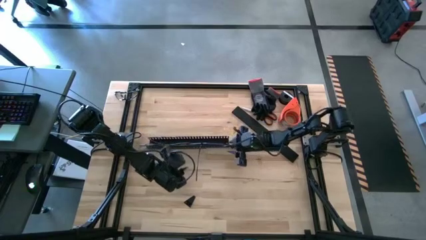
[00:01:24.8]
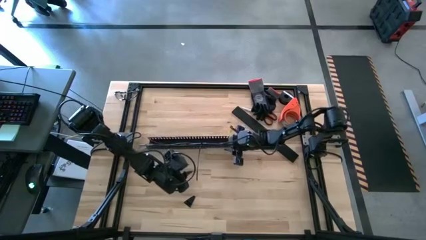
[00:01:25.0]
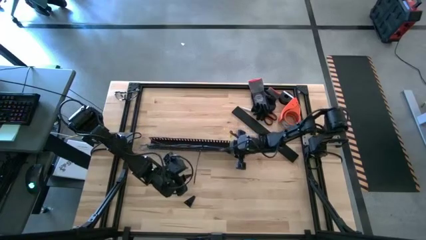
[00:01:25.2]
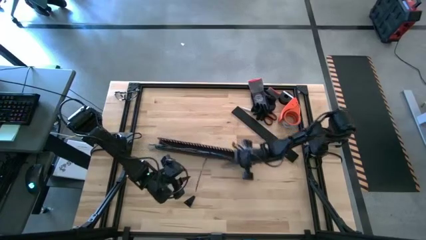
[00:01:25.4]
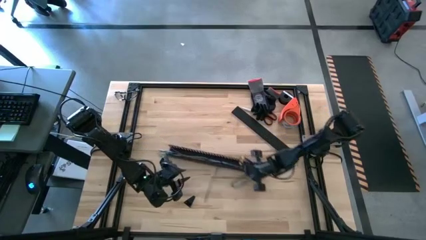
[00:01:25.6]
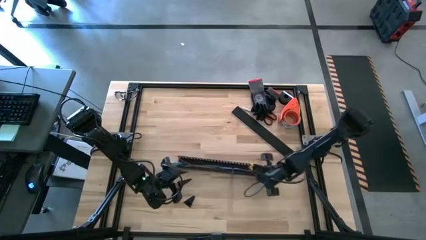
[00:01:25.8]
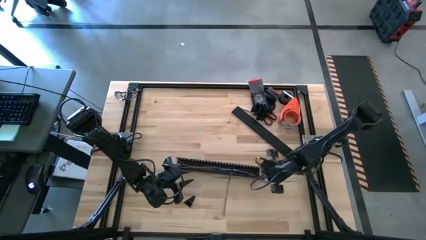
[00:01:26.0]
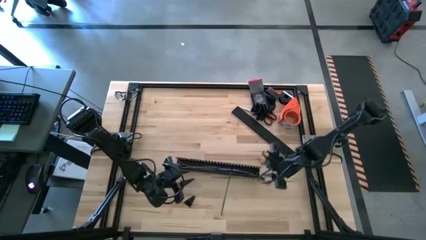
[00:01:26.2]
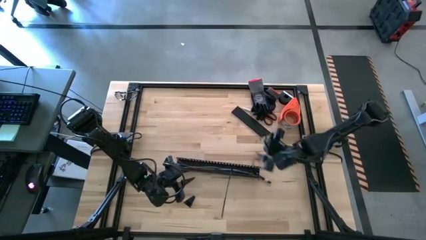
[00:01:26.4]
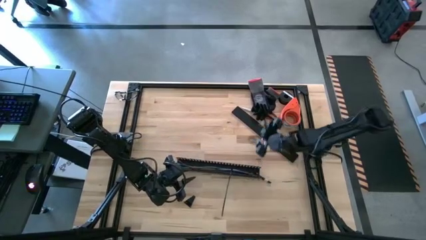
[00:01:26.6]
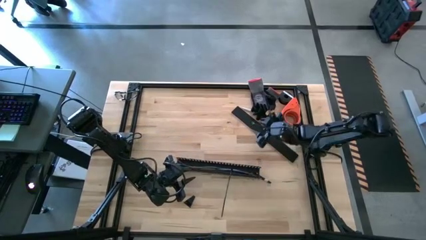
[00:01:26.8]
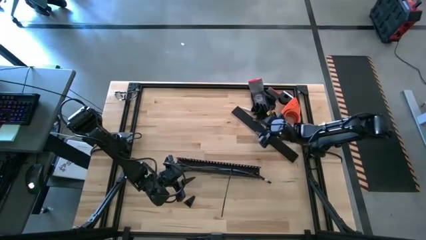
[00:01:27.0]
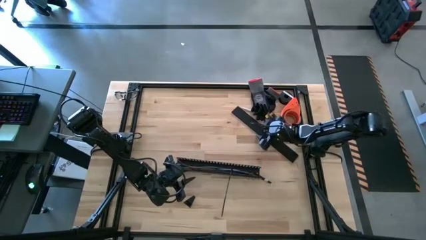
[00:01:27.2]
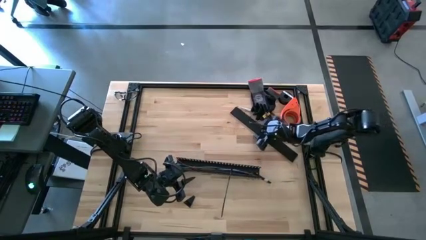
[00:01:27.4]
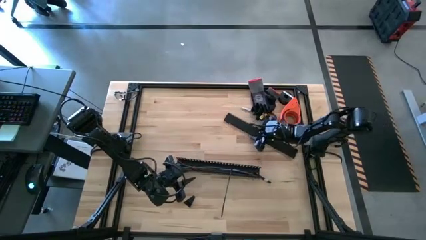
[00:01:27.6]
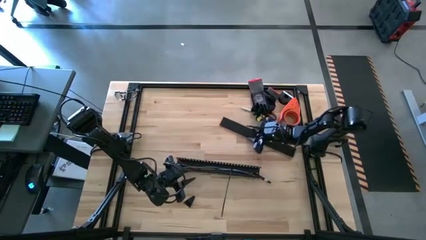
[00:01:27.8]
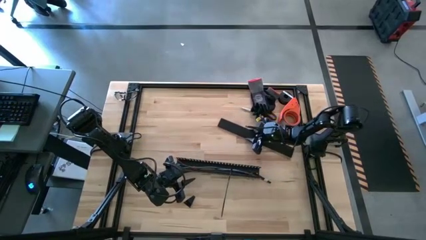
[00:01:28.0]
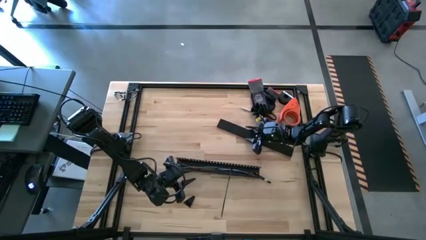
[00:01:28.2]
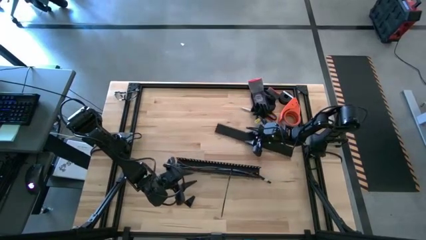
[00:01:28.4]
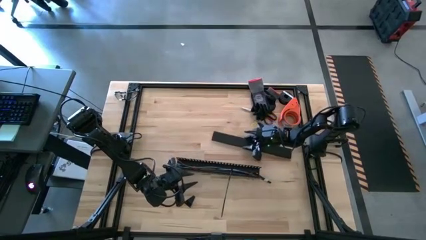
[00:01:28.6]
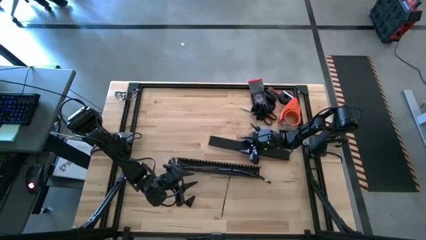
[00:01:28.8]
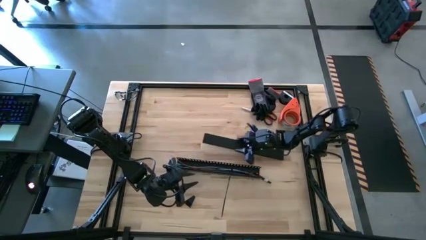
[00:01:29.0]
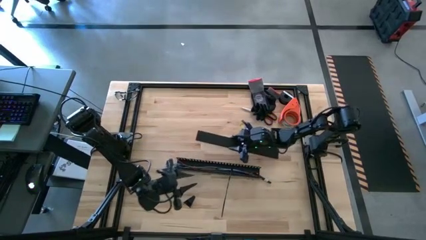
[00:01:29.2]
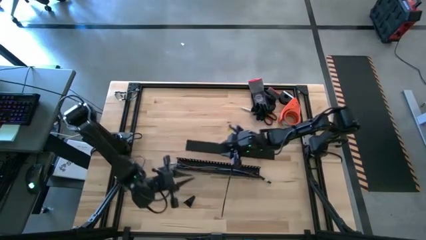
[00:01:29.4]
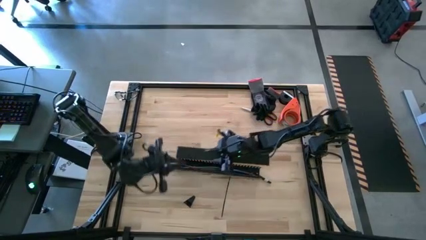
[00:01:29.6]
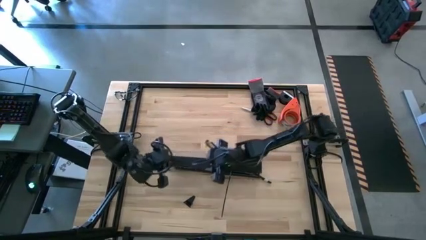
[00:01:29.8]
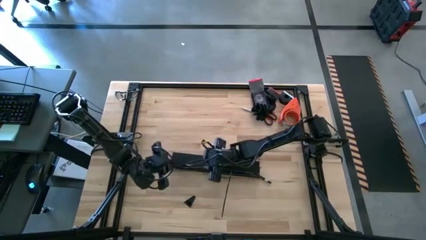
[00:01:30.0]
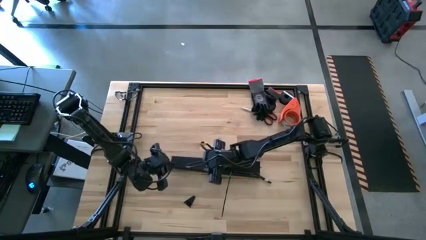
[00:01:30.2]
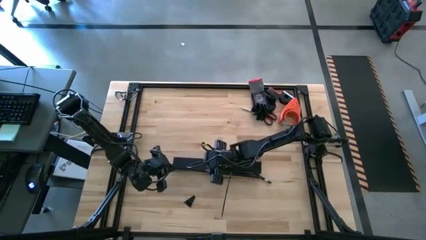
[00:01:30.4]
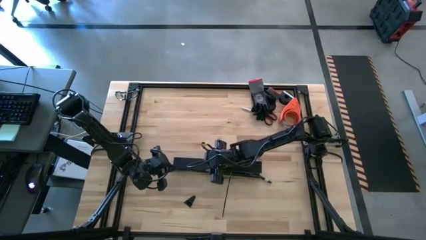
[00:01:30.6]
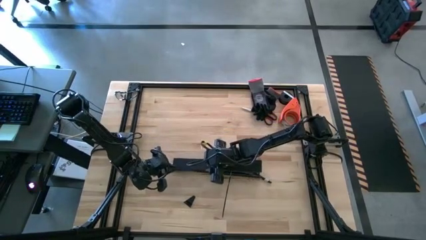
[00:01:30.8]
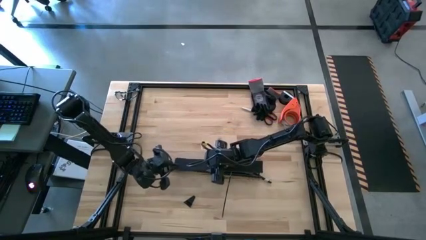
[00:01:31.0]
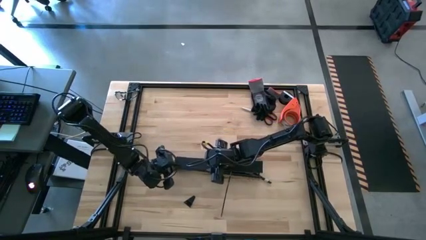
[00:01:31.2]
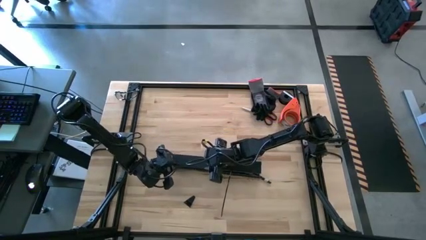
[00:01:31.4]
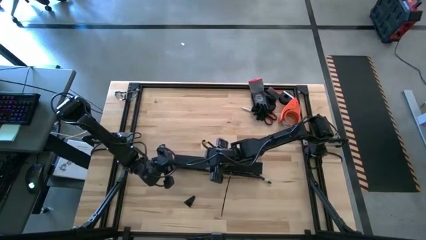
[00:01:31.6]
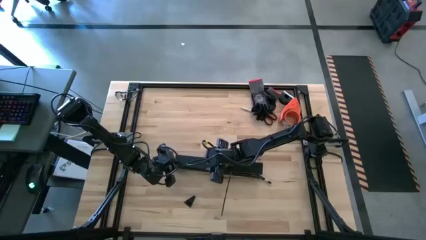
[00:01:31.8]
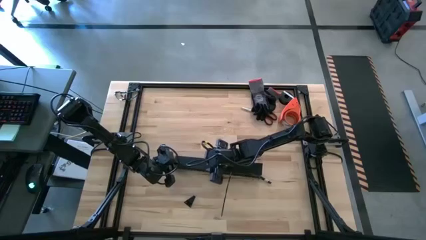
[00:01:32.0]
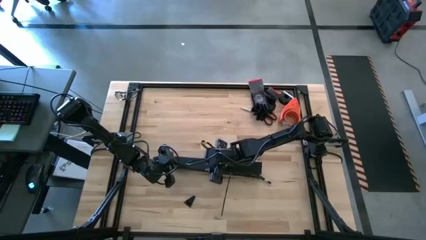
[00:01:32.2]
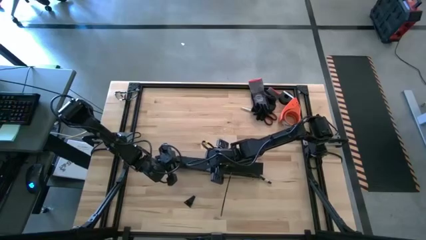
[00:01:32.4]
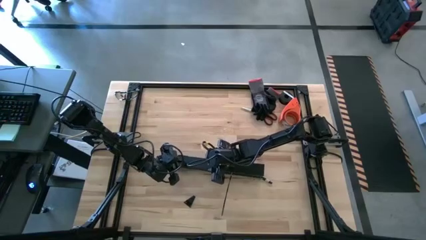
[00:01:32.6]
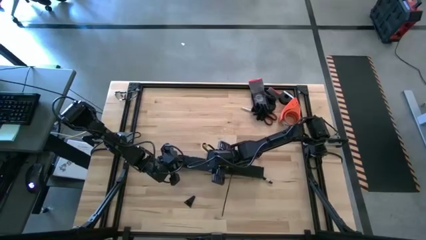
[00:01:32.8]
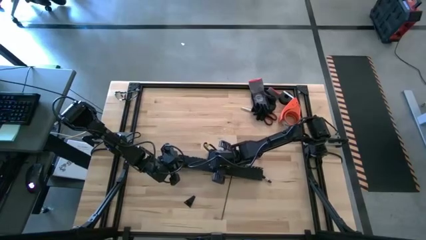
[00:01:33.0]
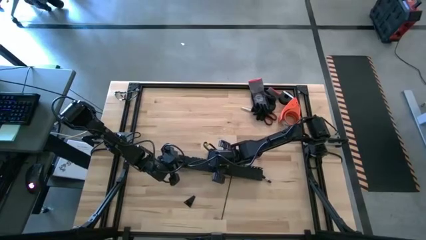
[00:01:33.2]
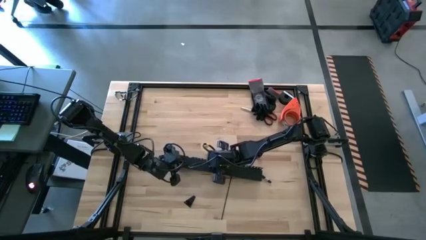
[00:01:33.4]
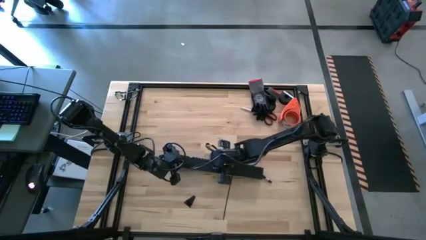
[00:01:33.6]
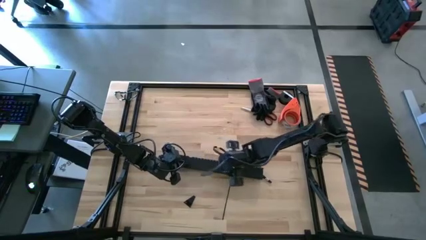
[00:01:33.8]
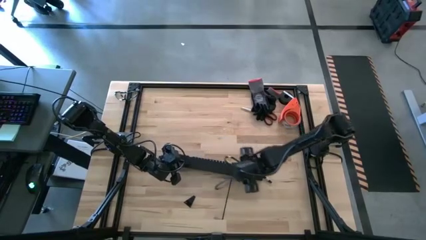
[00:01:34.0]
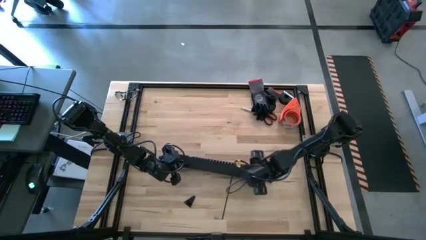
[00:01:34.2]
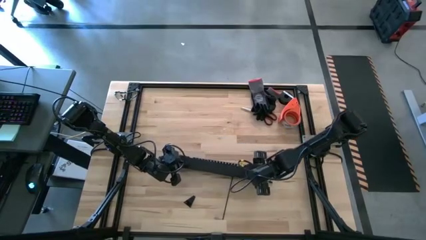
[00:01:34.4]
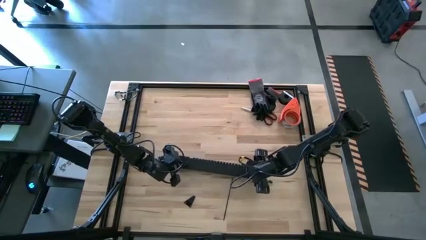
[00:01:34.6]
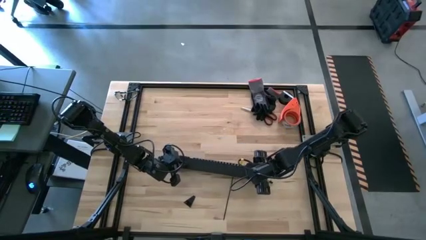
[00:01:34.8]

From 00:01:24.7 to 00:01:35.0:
Task: Ziptie cables
Close the black cable duct

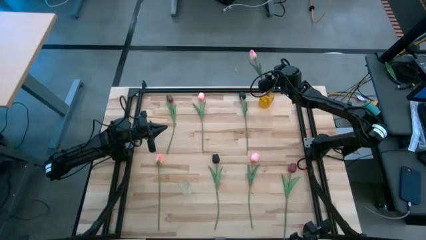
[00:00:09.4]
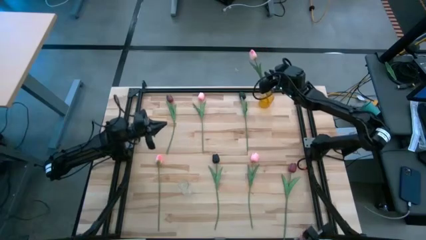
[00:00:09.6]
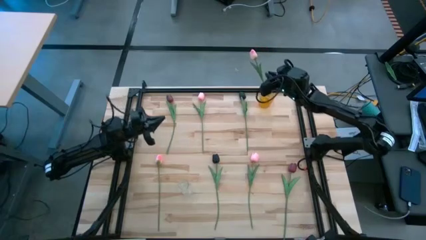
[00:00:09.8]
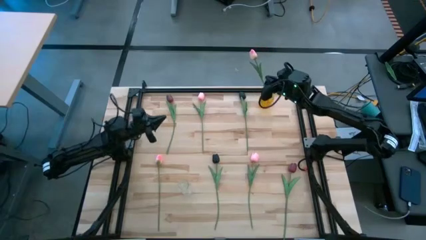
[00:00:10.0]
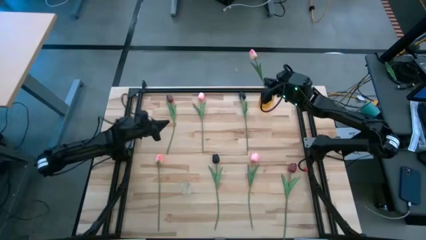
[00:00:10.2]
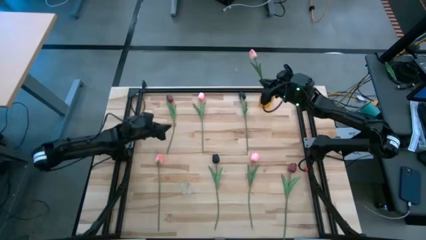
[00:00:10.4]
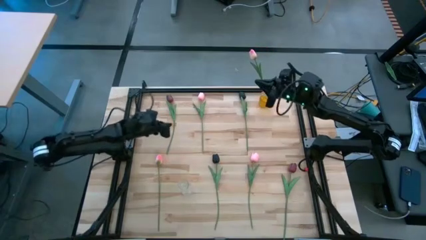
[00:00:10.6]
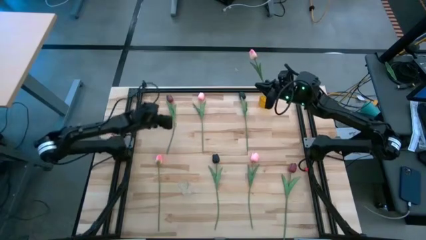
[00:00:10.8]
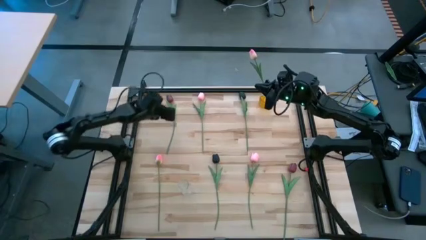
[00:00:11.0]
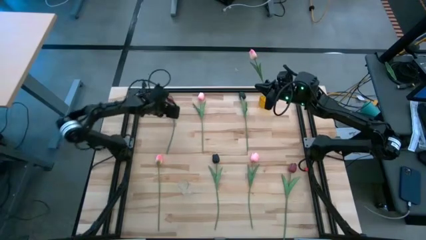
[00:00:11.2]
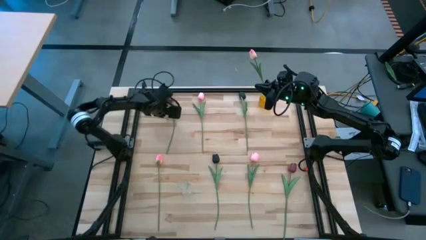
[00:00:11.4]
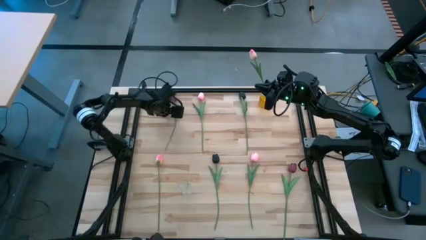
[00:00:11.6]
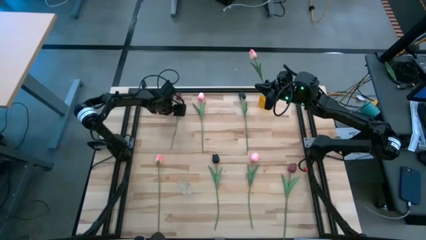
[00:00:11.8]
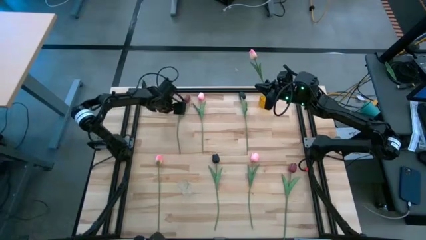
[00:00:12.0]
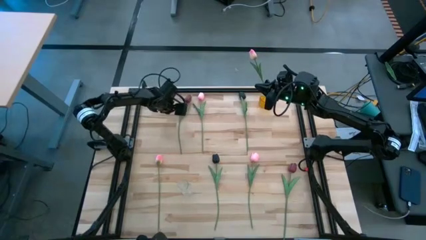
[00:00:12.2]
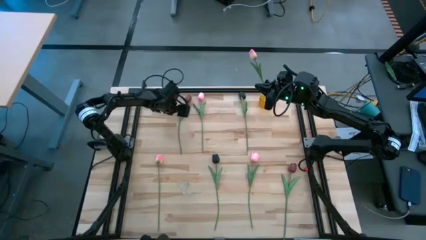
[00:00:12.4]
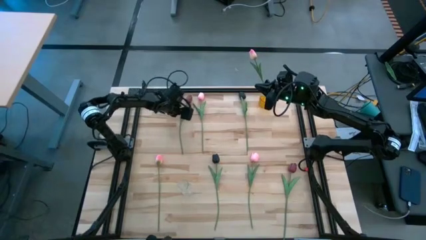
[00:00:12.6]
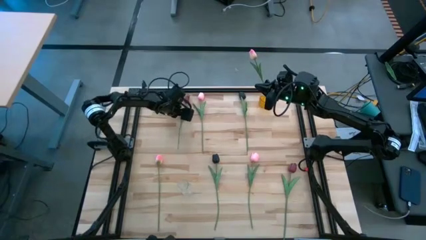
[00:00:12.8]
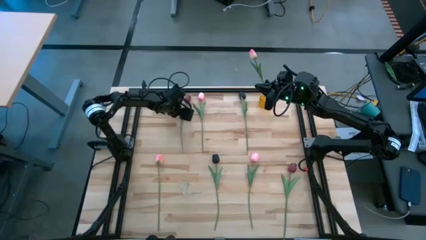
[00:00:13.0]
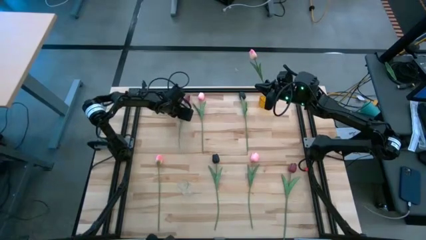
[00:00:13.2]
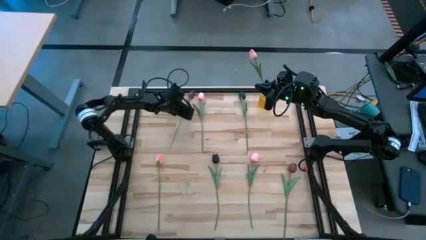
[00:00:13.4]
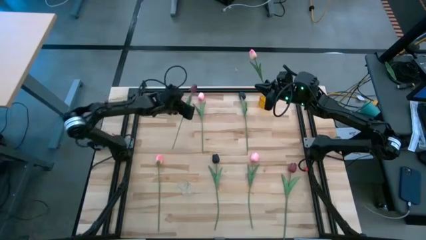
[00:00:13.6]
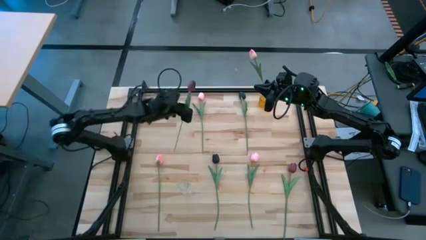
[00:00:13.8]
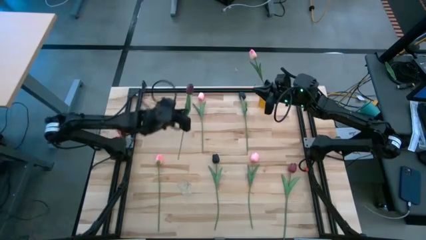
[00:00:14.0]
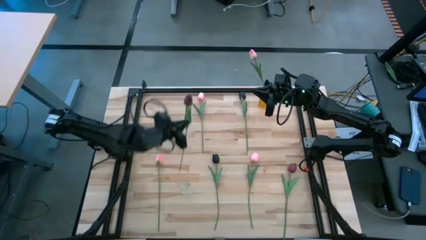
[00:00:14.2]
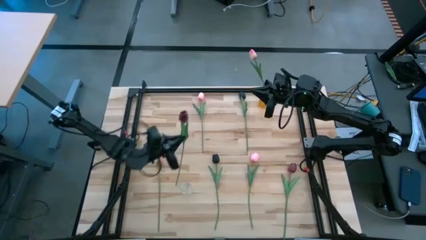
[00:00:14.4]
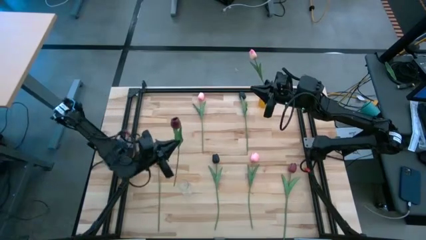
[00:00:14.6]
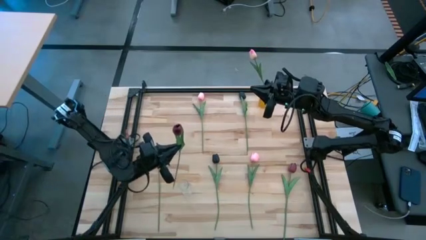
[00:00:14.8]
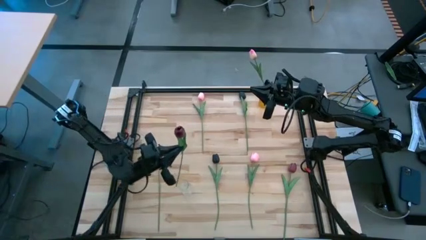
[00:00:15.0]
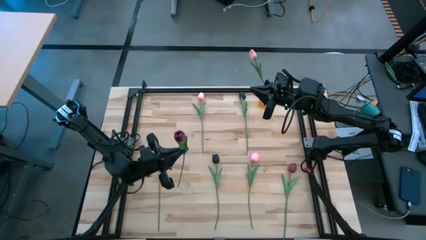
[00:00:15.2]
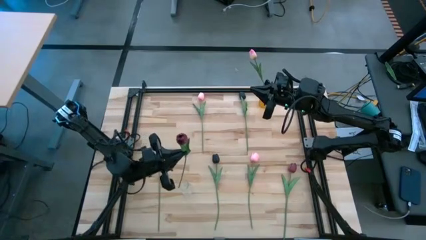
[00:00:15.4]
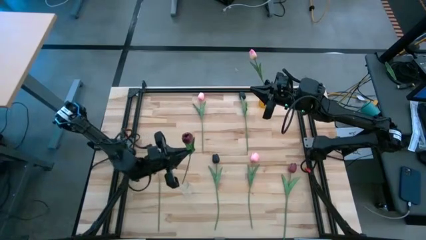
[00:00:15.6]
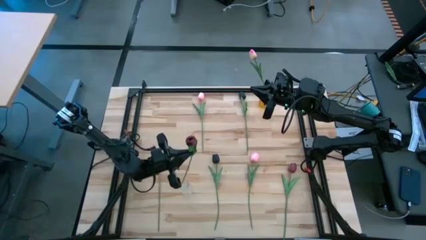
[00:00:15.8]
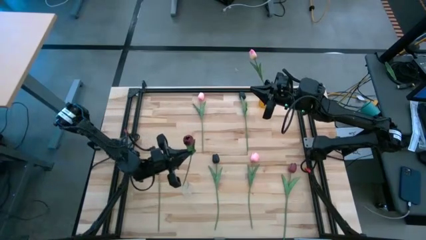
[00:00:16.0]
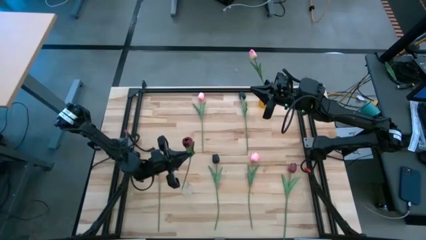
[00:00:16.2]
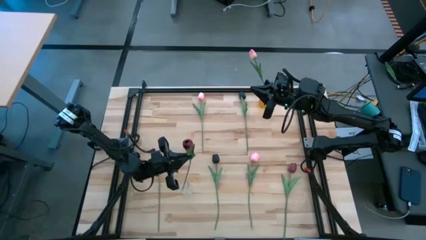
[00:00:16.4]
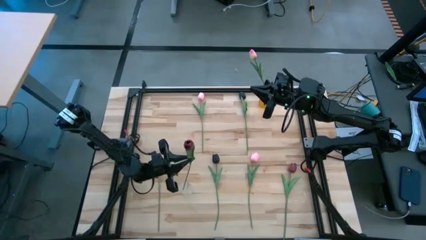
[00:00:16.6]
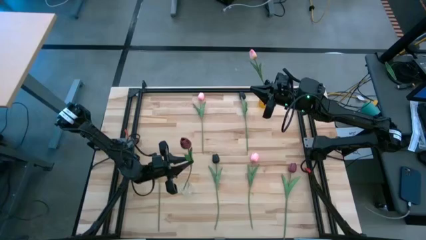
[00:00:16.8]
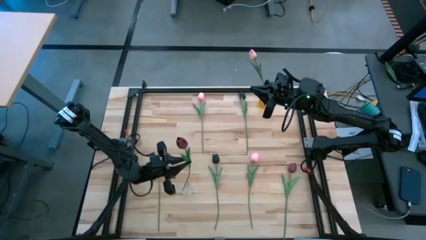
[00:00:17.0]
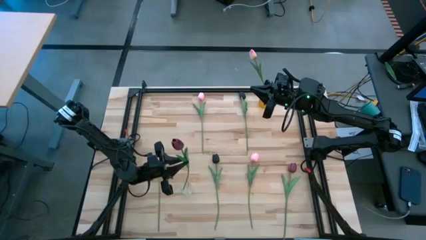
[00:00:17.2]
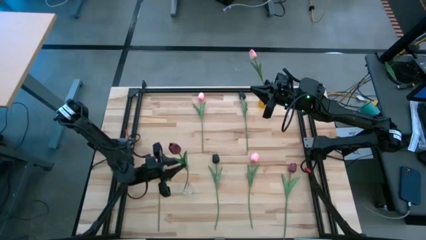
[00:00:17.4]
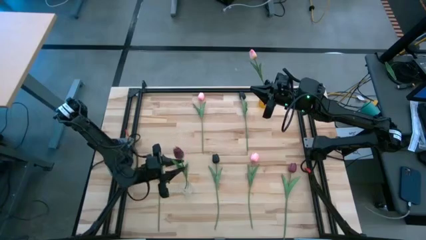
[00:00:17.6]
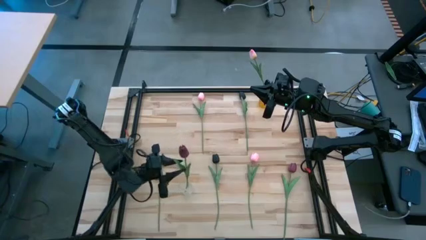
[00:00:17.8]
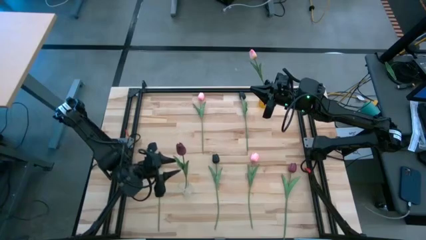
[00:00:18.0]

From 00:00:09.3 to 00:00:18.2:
Task: Sort flowers into vase by color
Put the top red tulip flower into the crystal vase
